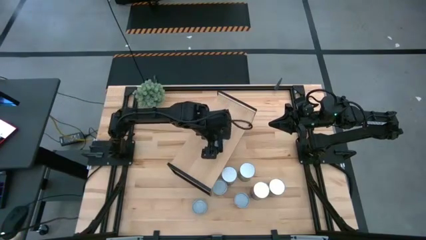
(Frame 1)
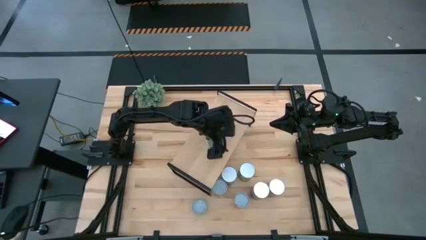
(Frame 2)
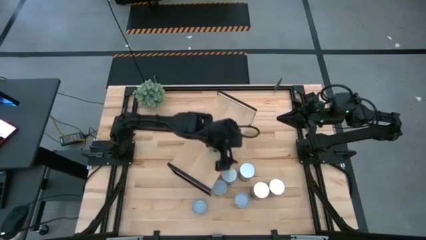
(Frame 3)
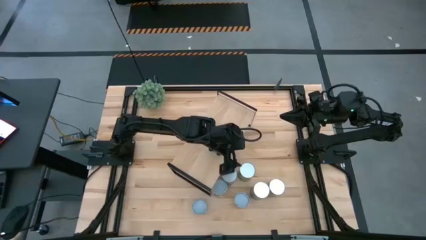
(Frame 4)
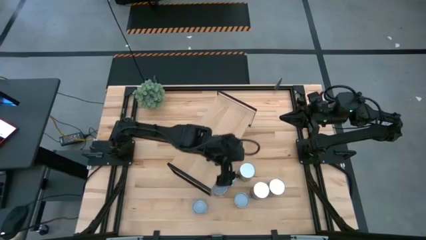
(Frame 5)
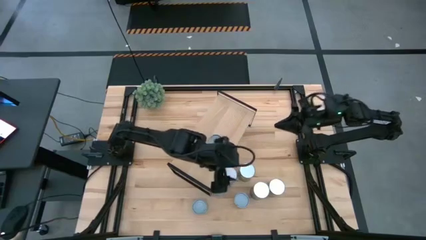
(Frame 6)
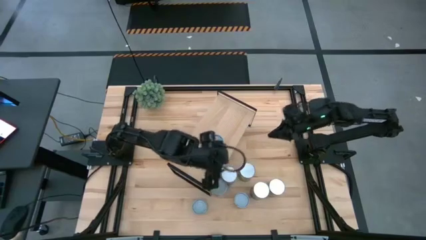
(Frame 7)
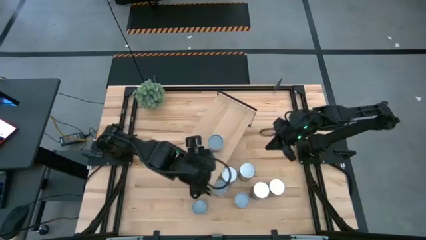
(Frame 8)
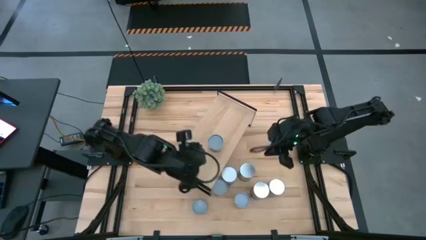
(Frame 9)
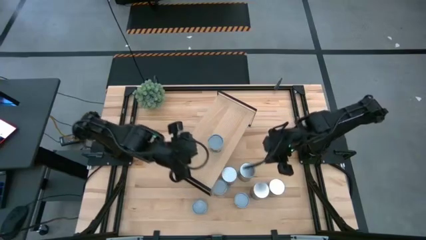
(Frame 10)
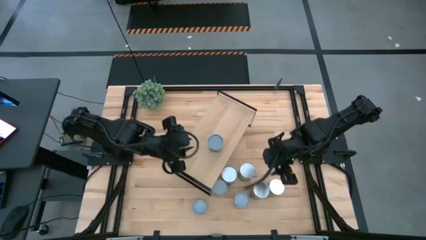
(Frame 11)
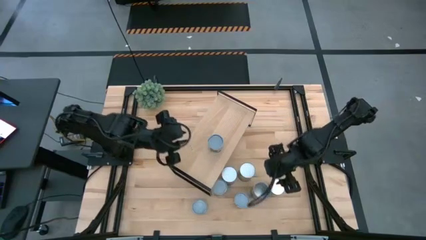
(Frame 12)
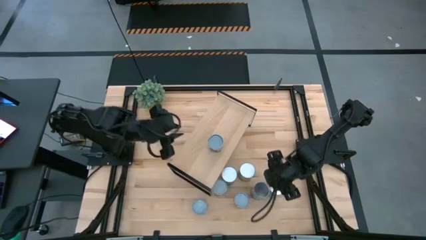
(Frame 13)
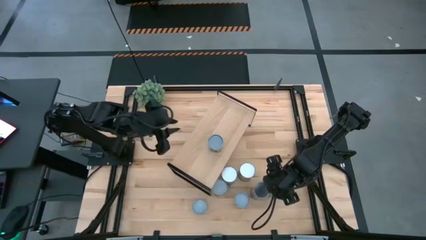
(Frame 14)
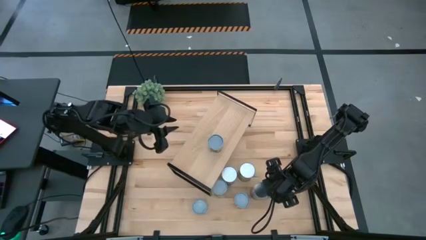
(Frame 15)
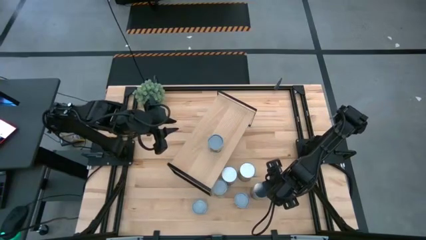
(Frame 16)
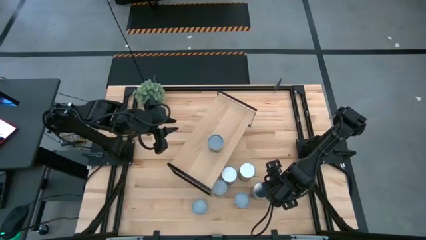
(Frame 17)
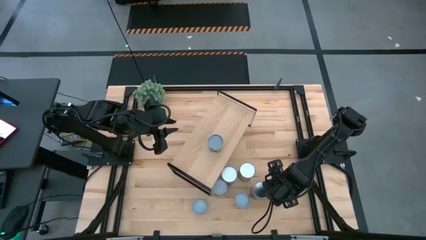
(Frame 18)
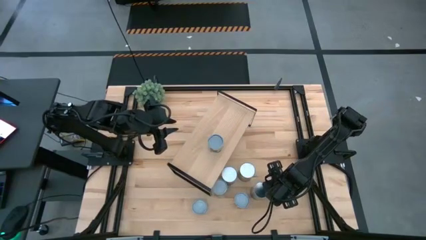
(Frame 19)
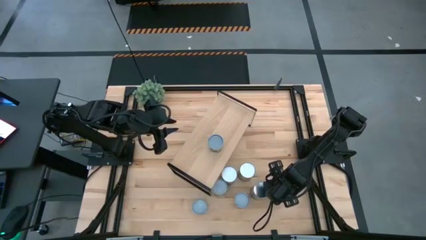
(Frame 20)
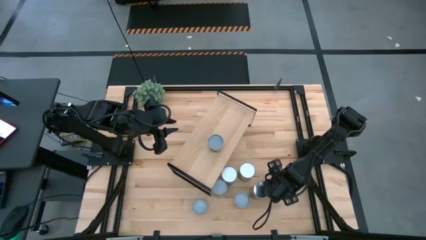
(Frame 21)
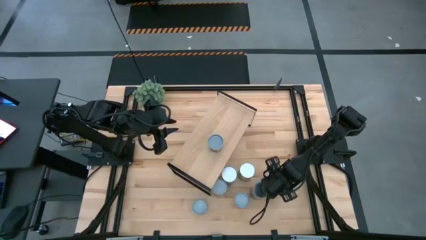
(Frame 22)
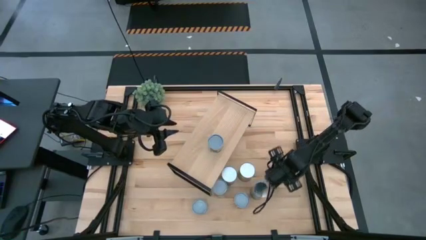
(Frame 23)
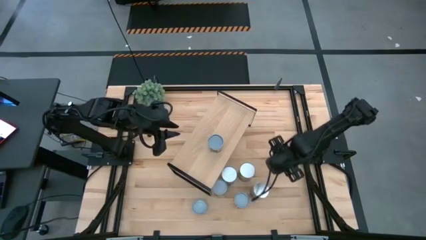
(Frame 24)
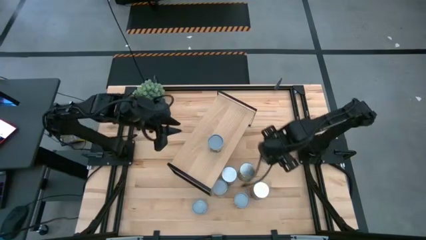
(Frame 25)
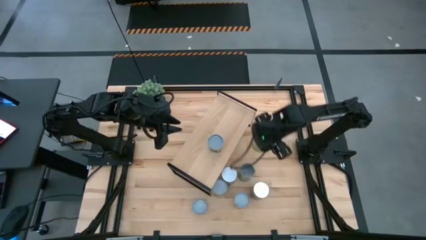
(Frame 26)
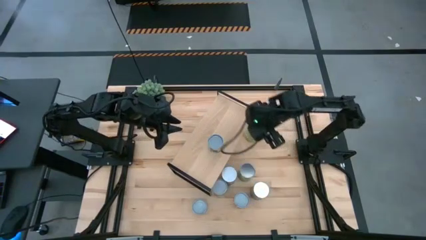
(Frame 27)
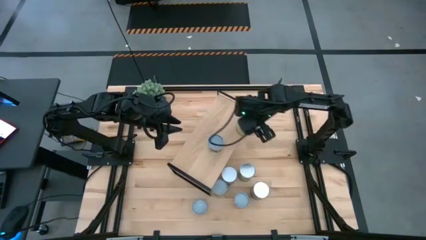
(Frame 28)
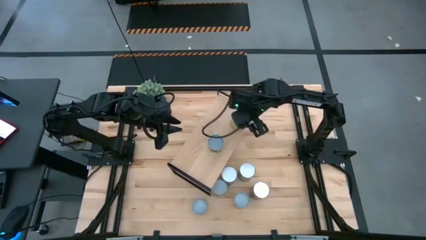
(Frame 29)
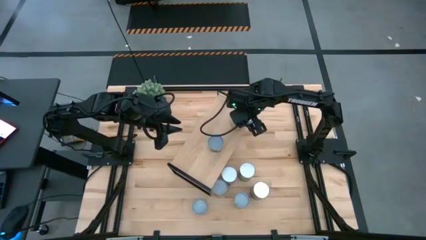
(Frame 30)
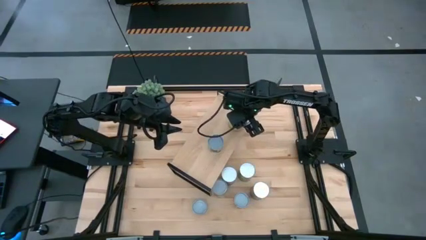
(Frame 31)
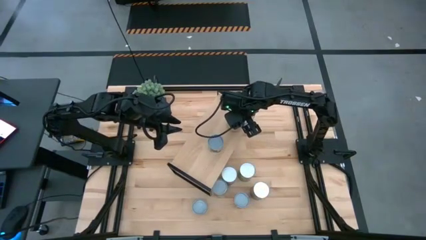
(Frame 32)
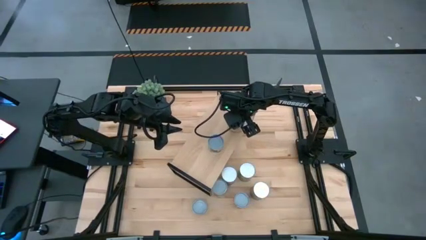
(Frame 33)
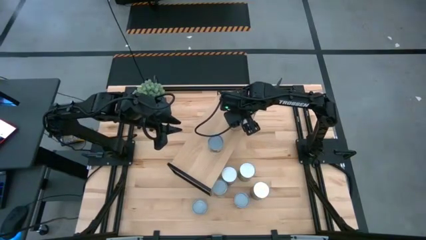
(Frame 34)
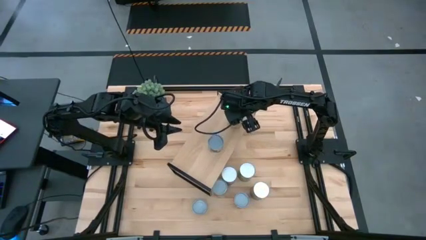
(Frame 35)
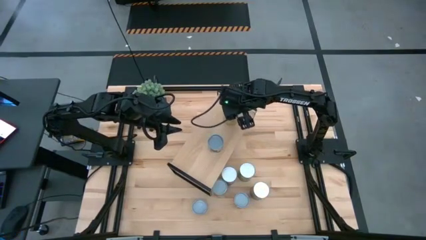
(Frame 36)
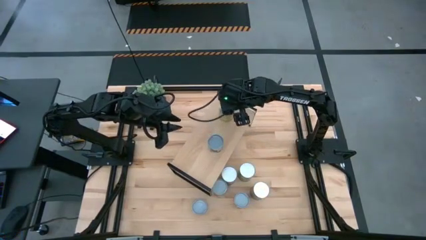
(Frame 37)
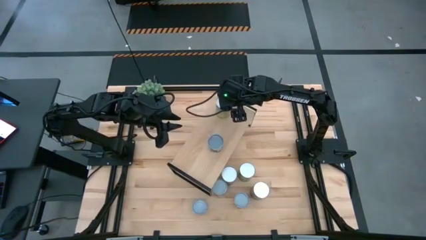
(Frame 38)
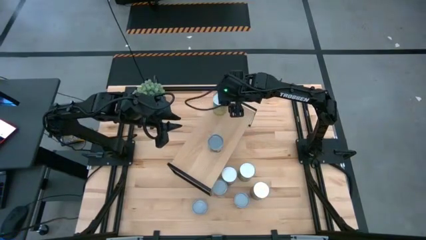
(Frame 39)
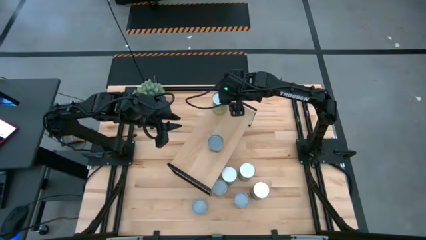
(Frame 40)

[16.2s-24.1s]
Task: Pick and place cans onto a shelf
Put the canned carrot on the shelf

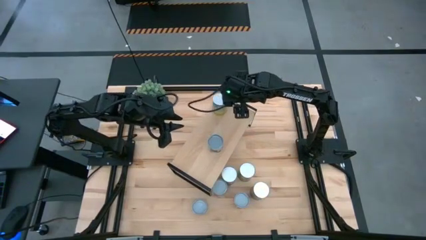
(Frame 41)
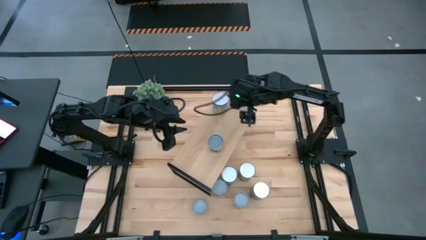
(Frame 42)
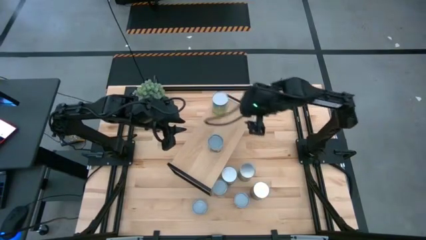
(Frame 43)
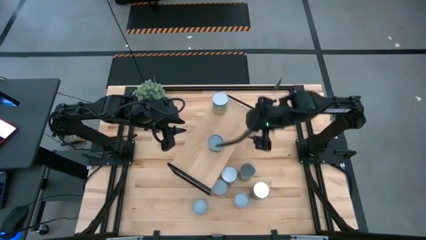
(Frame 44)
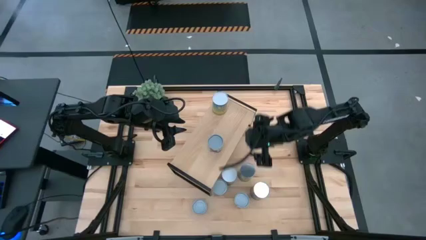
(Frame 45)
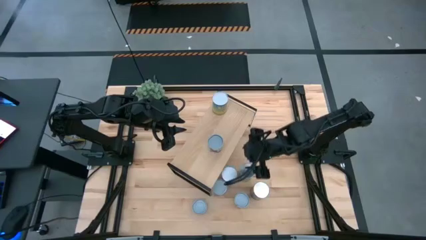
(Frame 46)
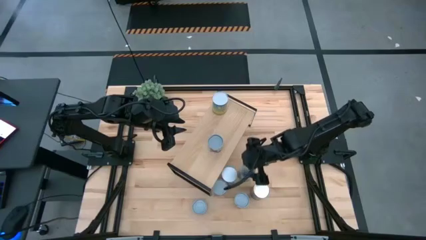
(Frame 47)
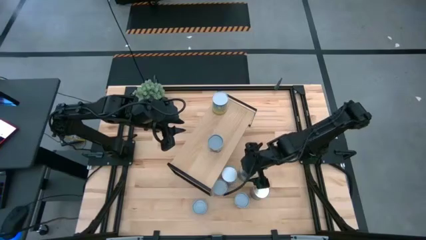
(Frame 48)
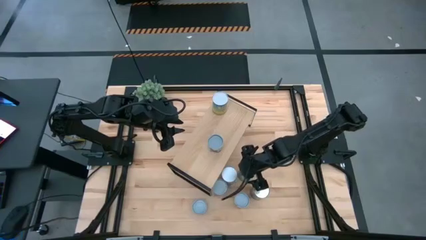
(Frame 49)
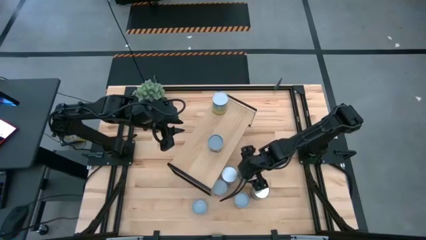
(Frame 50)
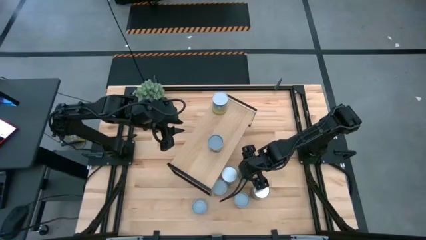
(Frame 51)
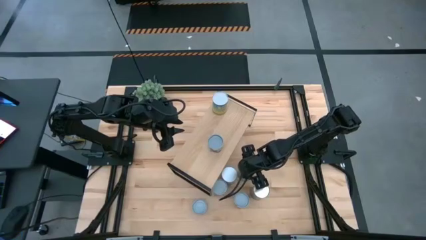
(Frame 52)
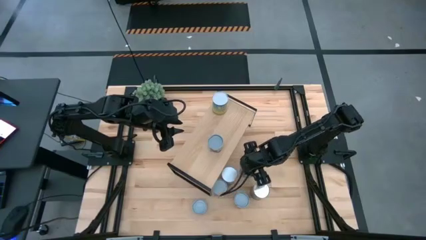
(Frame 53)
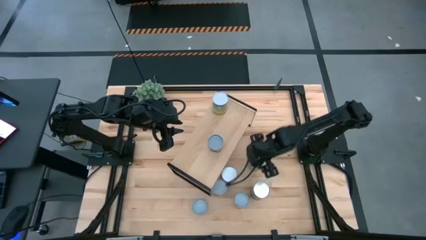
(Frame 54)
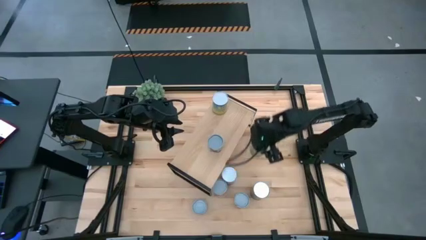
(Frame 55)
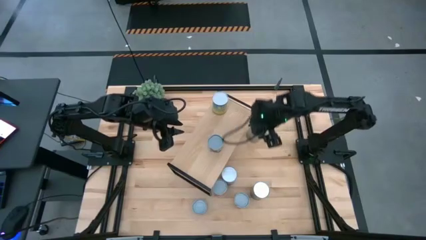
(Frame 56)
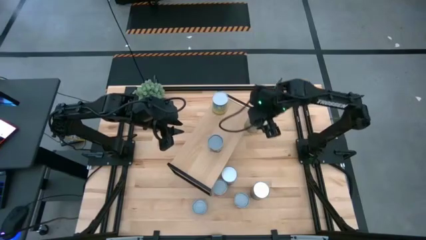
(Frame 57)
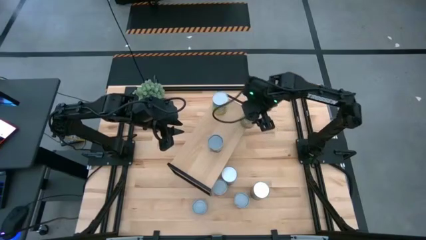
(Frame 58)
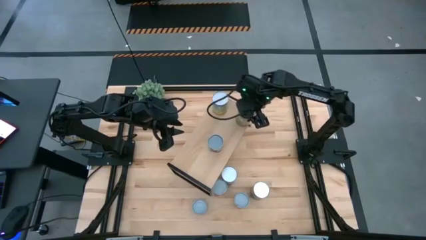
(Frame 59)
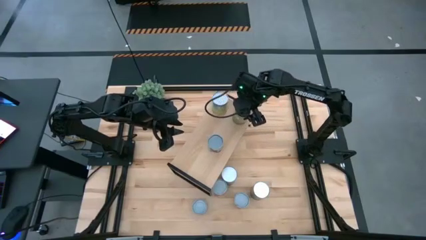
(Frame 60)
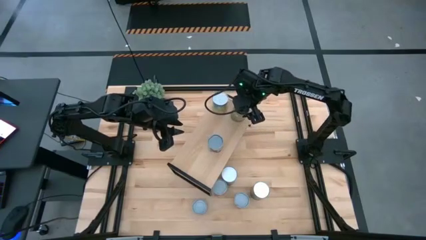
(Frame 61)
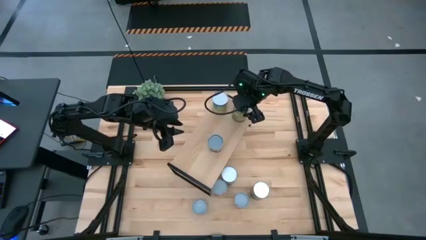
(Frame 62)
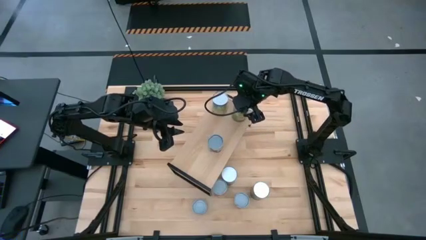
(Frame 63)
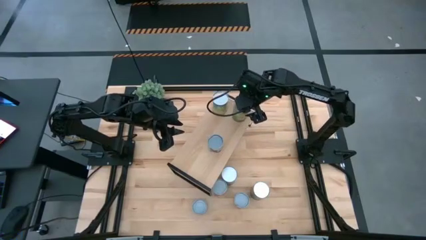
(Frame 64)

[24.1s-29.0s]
Put the canned orange on the shelf

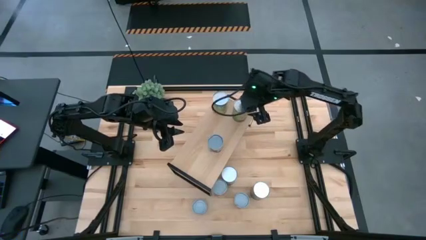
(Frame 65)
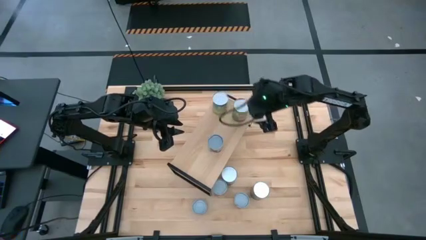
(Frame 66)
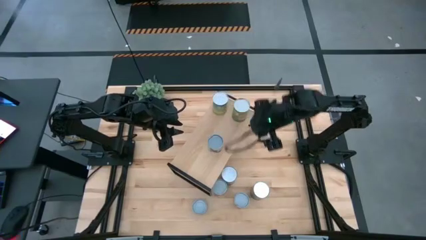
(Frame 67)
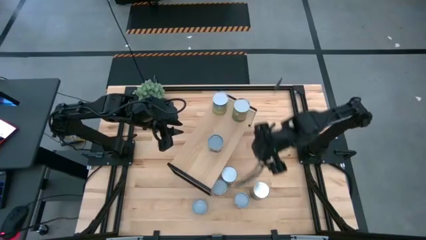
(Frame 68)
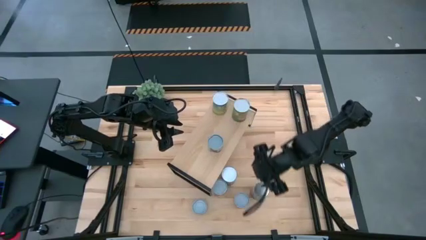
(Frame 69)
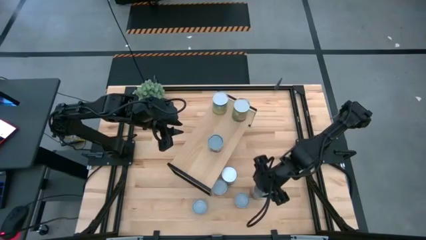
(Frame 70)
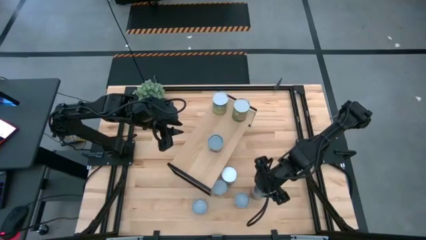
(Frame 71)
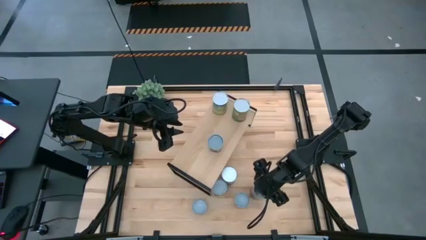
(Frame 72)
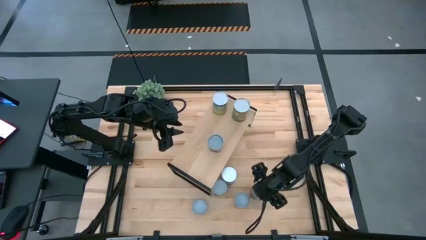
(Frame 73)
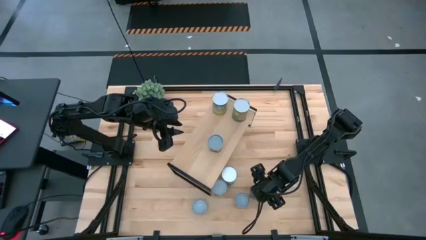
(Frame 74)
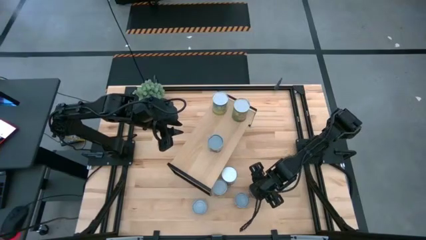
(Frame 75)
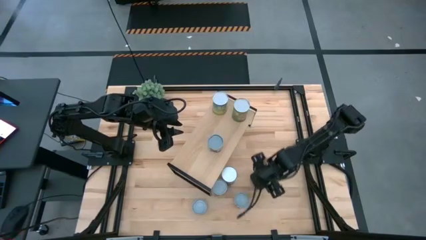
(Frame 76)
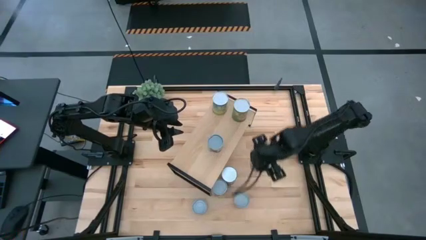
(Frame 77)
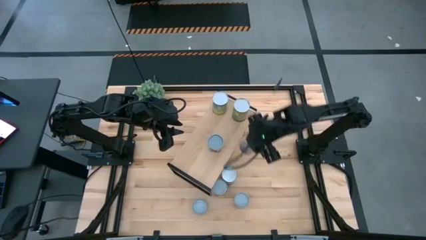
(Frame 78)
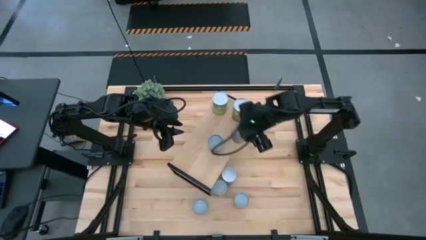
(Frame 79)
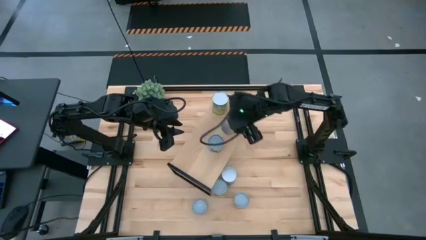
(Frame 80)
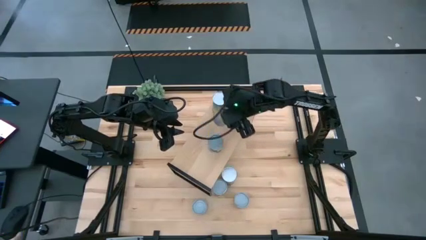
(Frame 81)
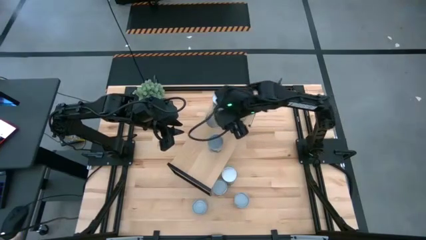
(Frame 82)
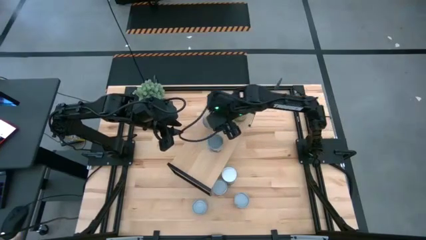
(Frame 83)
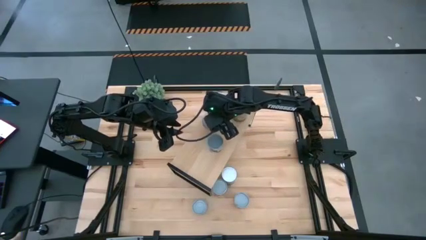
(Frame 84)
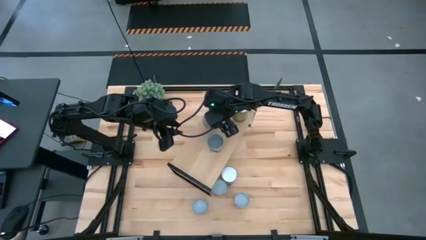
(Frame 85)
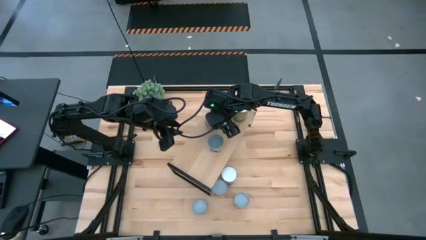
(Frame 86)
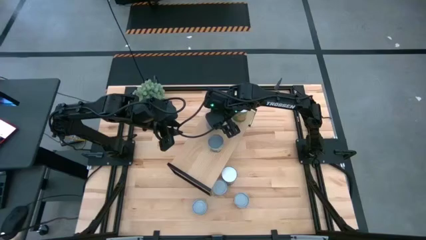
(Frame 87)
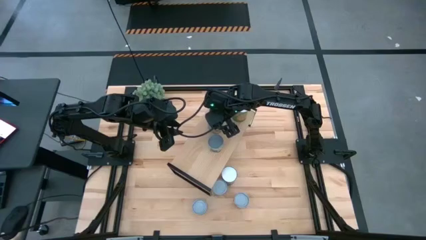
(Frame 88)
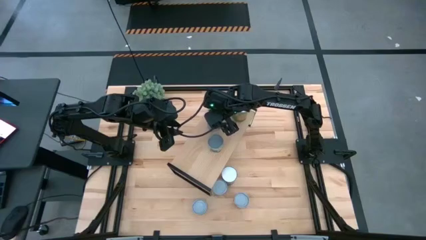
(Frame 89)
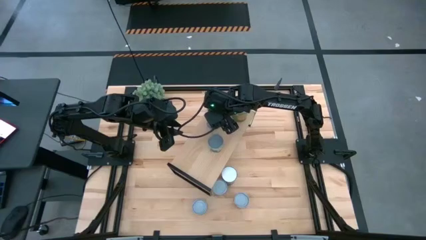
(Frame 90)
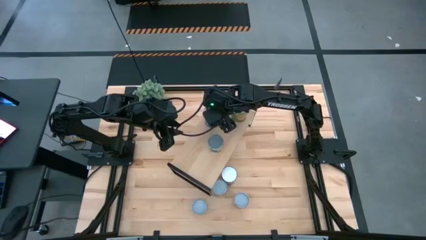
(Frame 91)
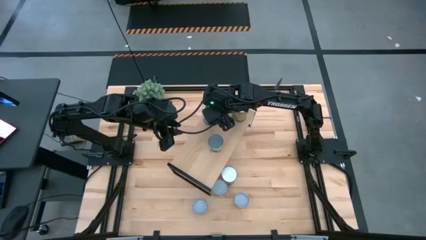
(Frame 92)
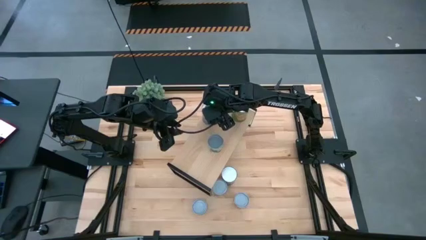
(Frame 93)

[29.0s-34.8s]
Put the canned peaches on the shelf
